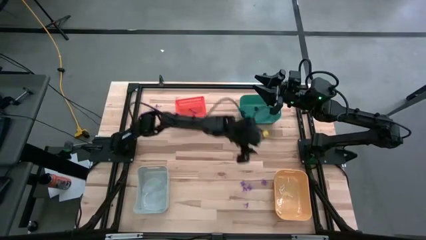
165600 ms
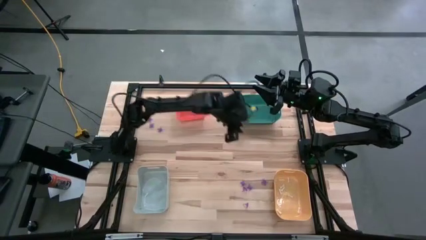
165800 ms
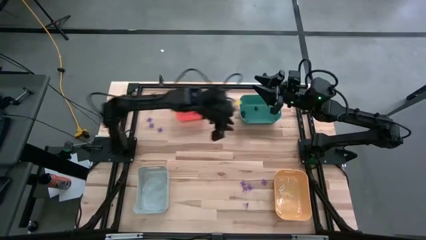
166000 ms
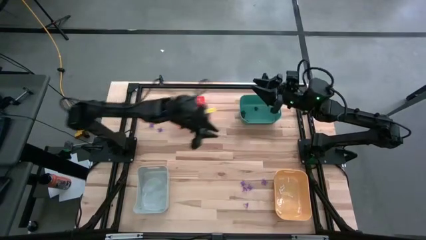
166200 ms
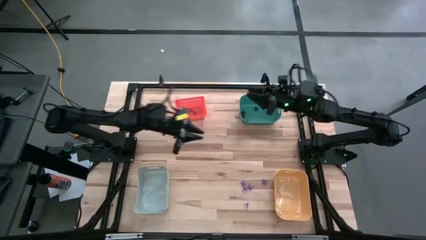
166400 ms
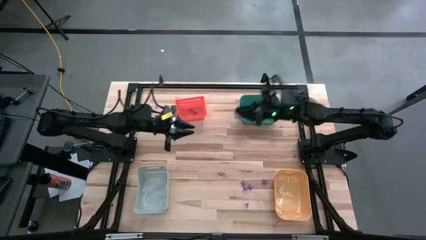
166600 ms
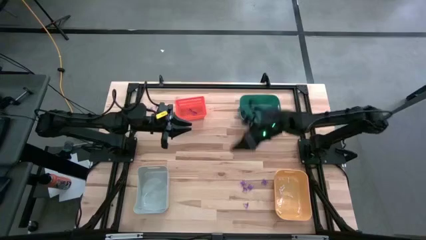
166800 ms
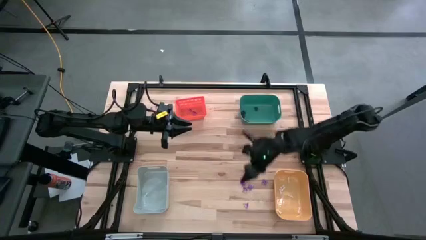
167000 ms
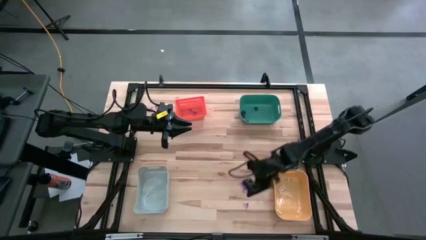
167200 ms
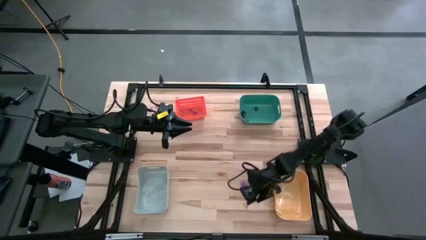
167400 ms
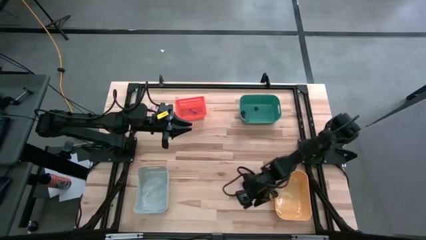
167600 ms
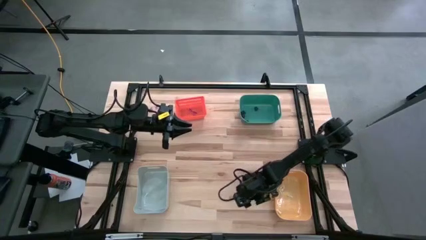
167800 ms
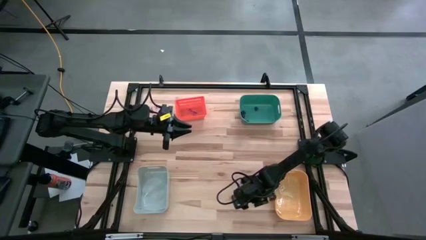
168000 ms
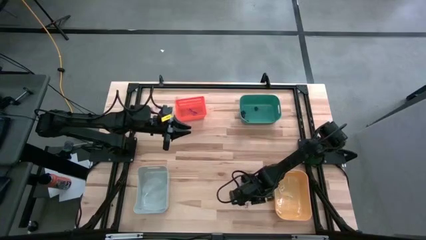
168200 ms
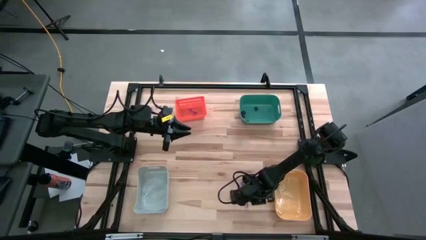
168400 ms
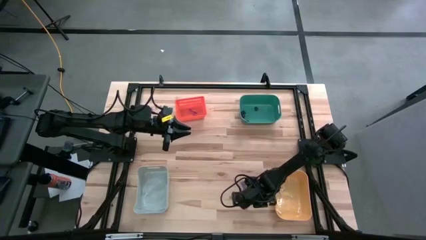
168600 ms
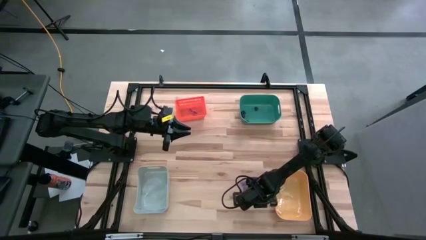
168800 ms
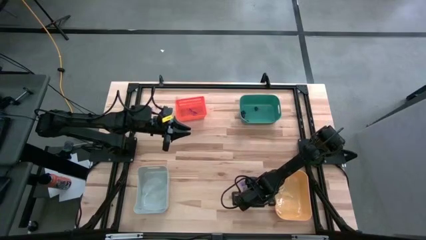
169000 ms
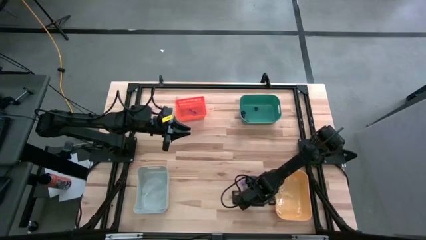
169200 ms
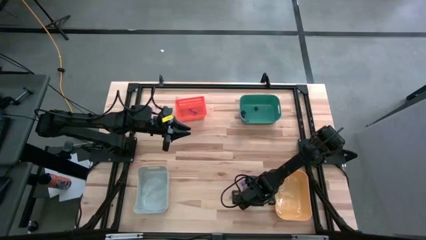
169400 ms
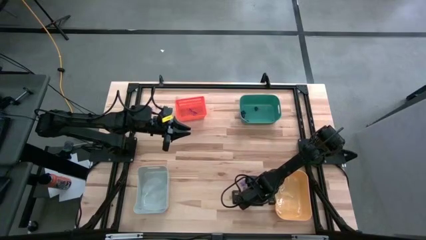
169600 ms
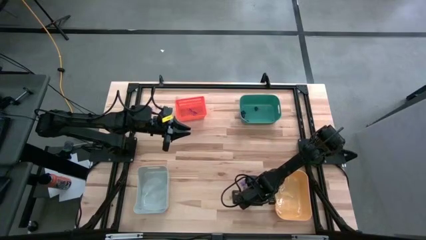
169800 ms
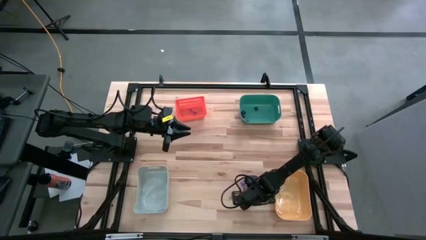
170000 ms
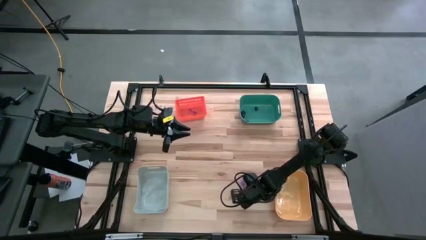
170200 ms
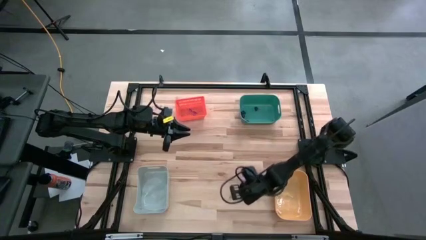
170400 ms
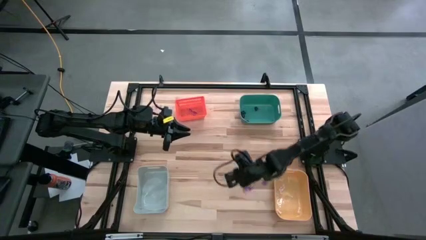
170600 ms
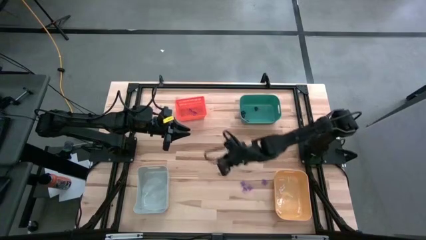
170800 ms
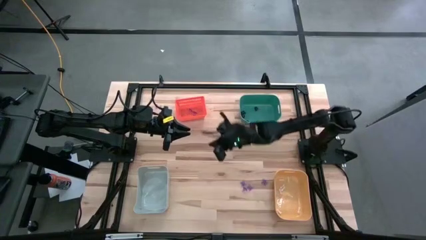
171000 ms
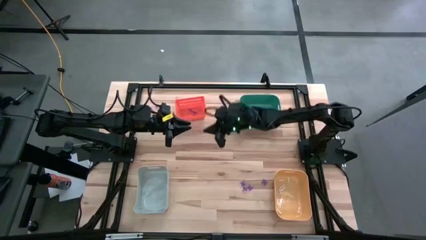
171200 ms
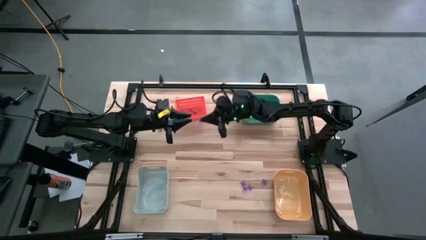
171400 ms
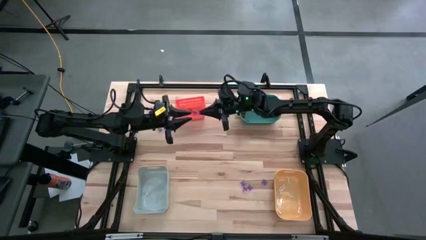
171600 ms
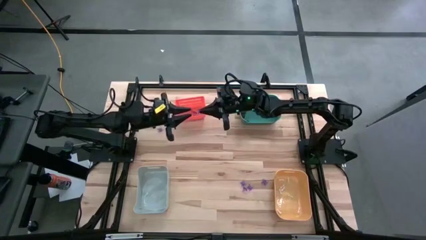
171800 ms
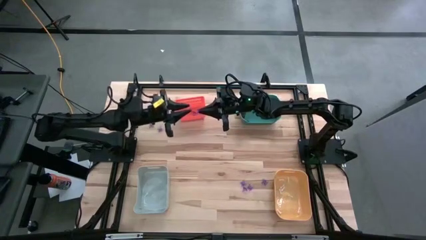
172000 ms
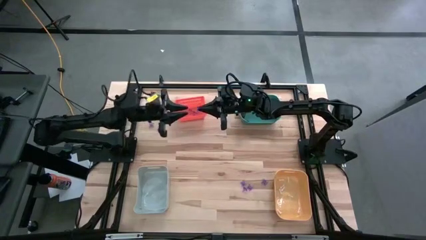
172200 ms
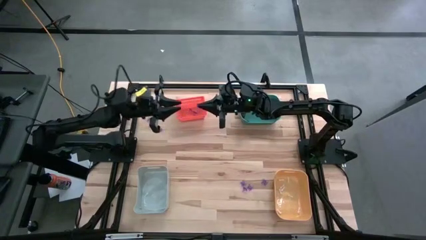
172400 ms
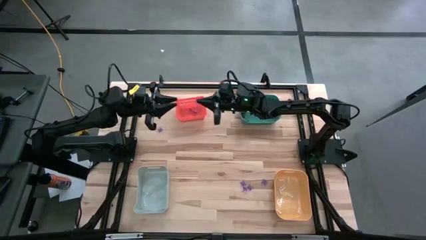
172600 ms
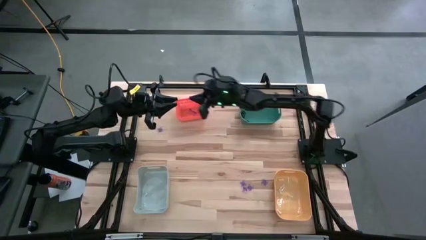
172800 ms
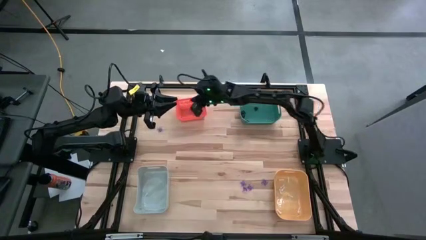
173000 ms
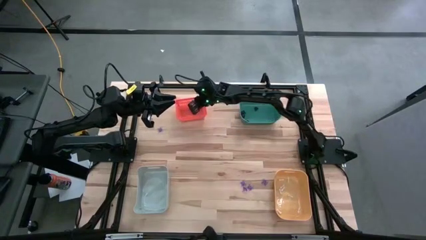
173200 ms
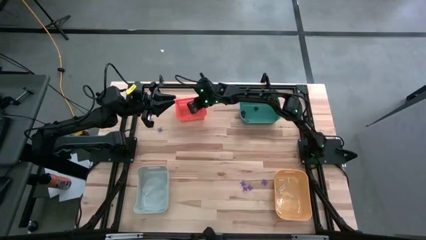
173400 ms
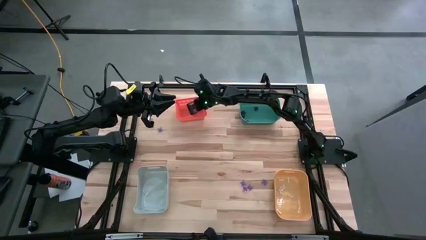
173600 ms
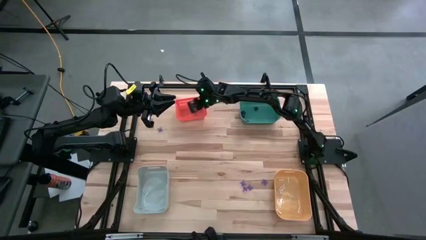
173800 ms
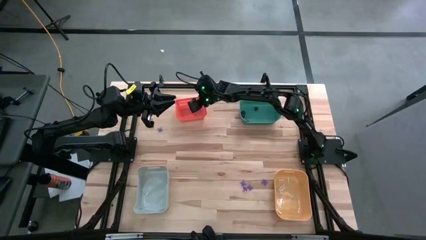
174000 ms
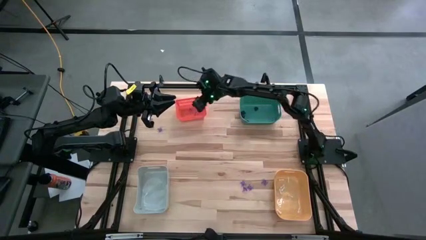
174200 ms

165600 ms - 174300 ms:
Task: Sort Halloween decoration
Put the purple witch hat toy into the orange bin

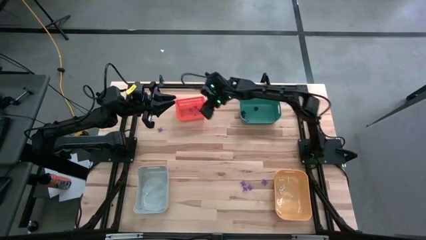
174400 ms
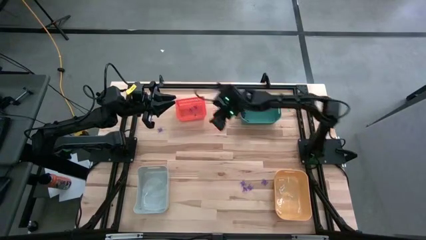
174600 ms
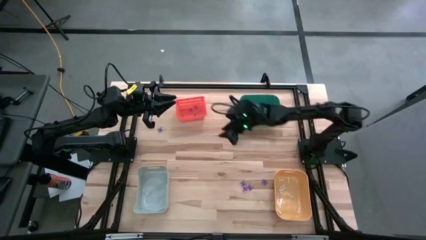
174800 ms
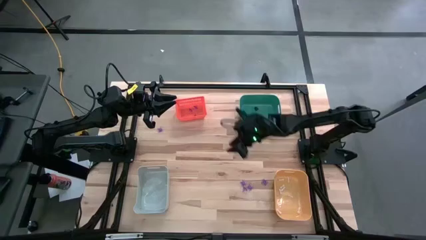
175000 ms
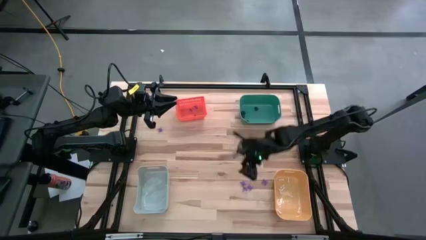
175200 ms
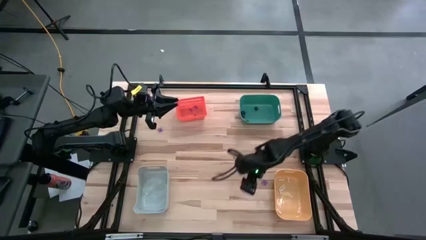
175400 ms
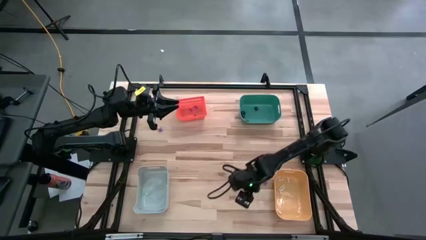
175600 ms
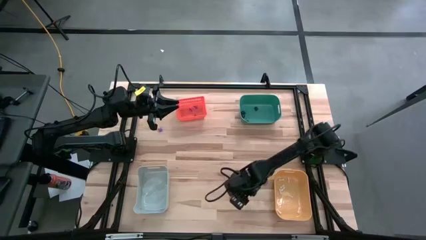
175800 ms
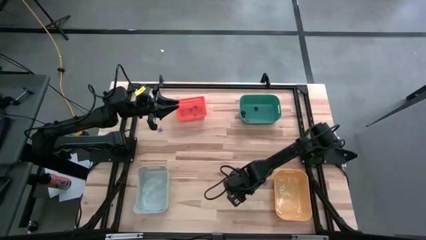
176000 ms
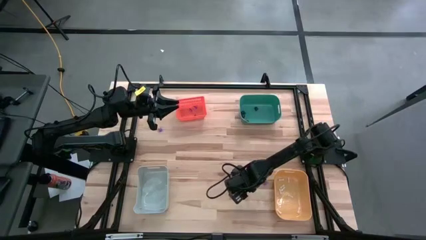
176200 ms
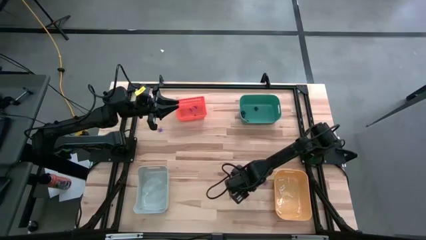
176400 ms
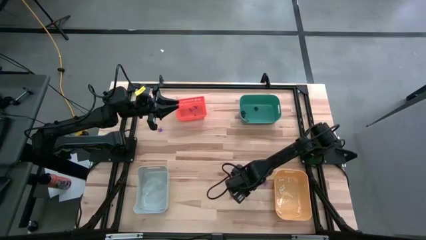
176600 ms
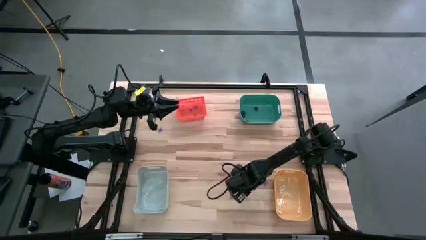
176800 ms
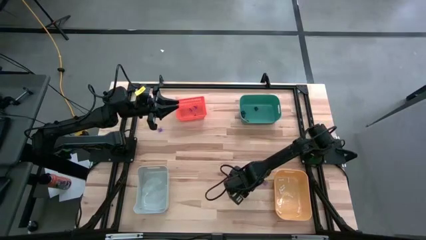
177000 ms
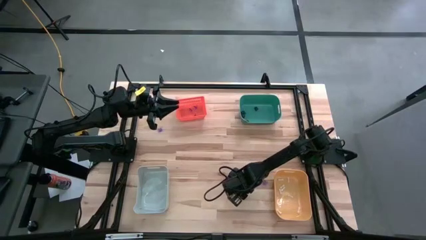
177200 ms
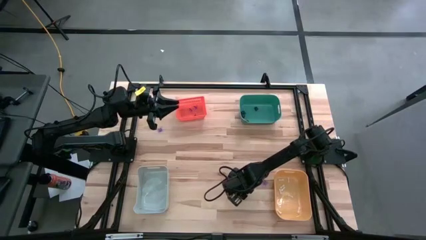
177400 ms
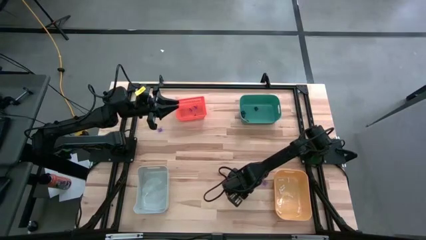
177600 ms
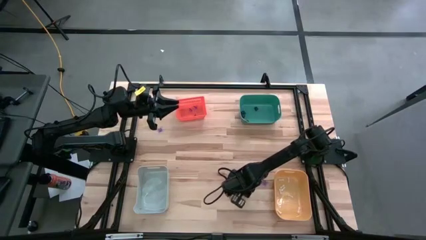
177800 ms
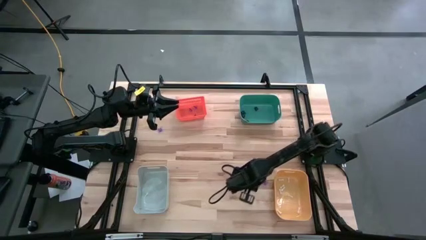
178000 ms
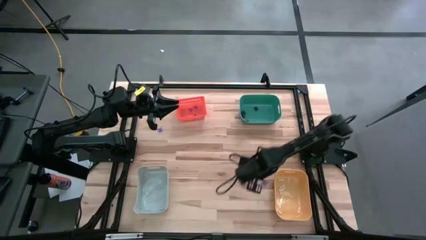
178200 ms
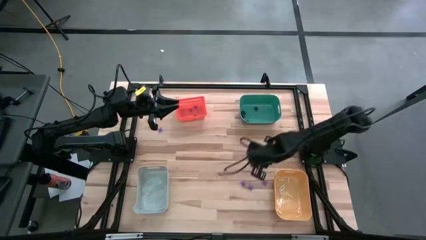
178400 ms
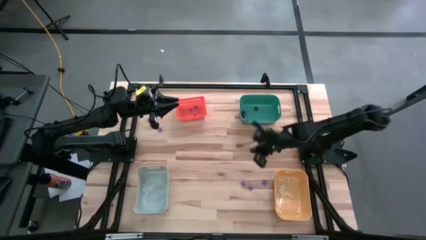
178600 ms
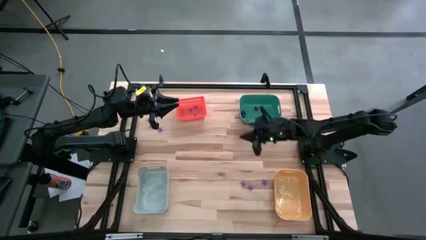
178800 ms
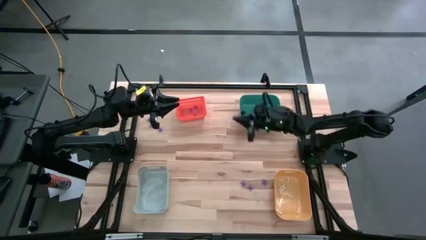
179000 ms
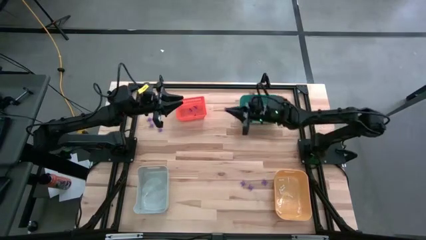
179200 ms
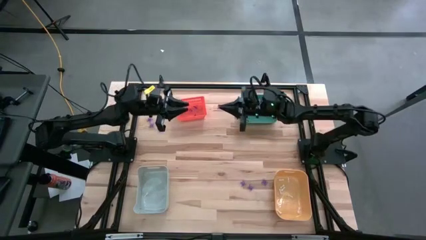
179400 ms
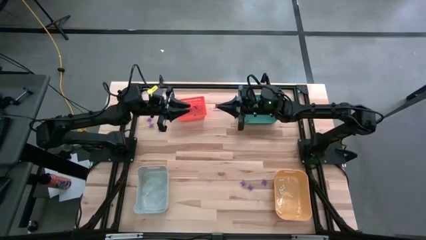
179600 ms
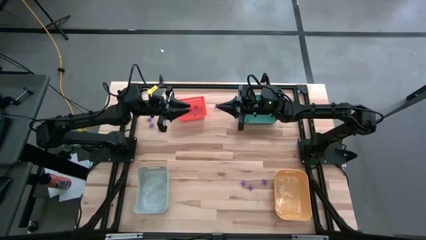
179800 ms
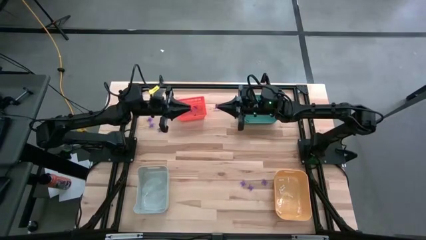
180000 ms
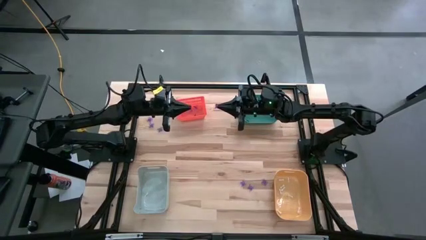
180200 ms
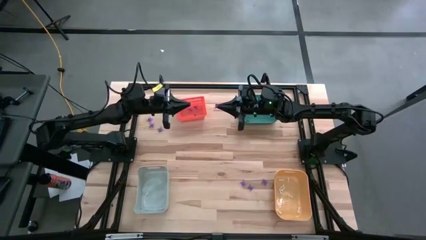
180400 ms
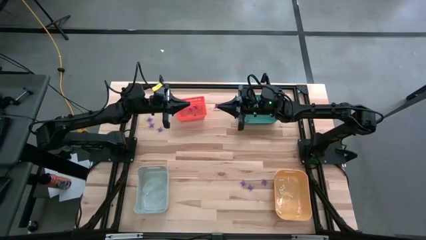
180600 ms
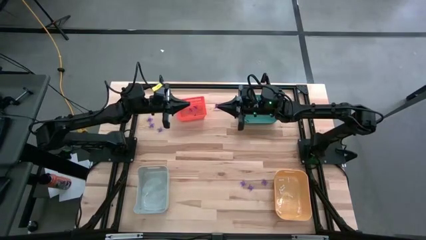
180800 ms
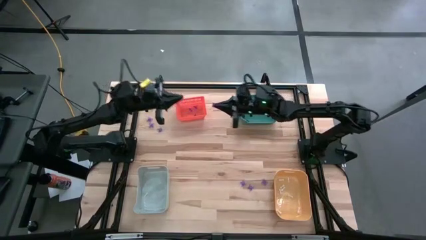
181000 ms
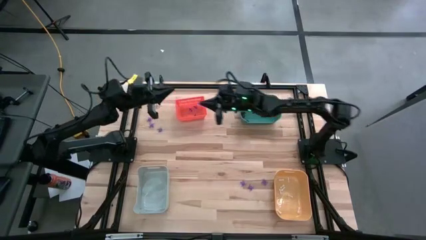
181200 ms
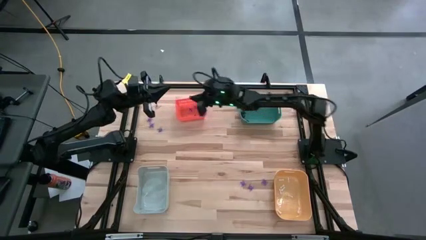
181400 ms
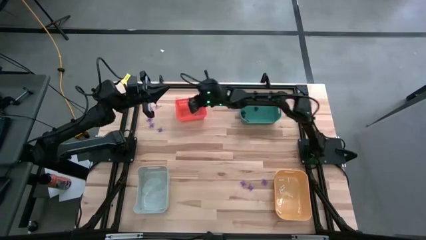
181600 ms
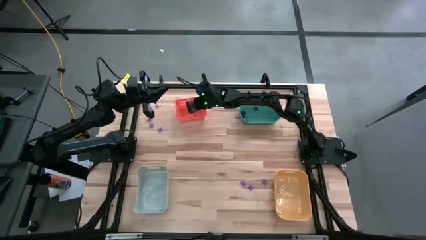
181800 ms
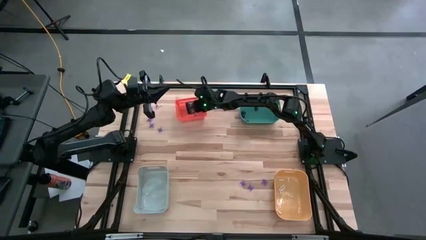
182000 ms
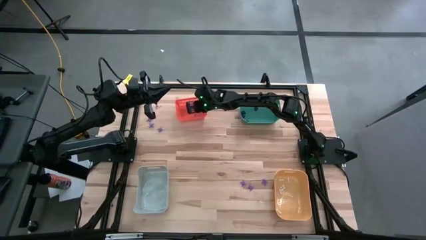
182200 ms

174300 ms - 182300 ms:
Put the purple witch hat toy into the orange bin
